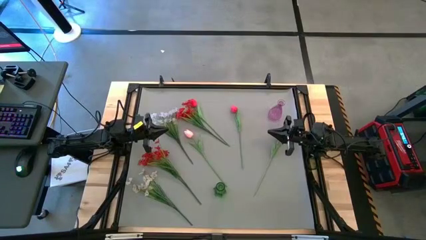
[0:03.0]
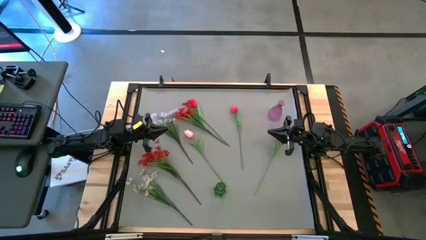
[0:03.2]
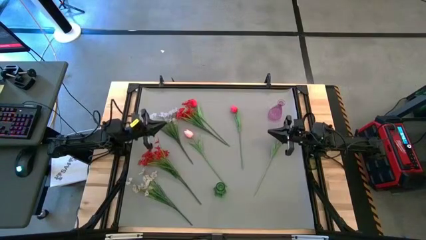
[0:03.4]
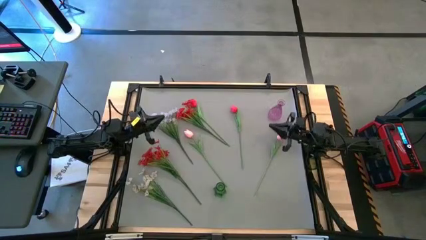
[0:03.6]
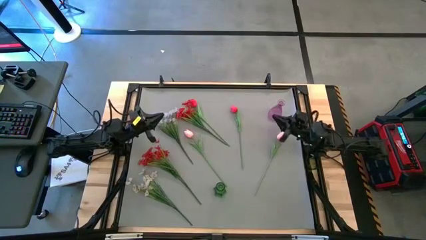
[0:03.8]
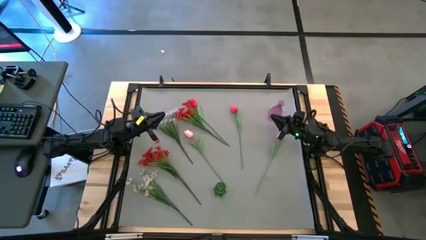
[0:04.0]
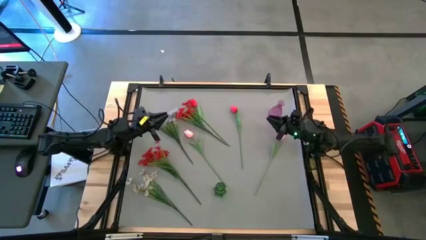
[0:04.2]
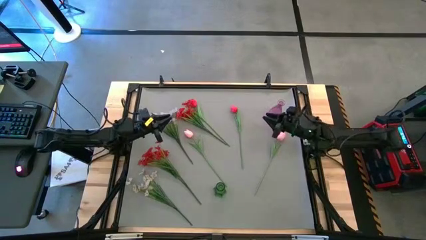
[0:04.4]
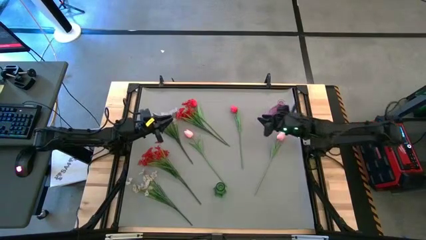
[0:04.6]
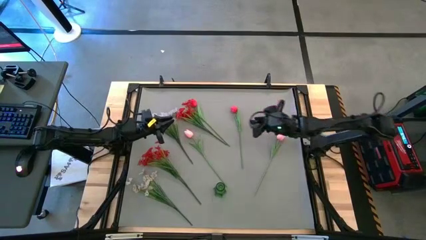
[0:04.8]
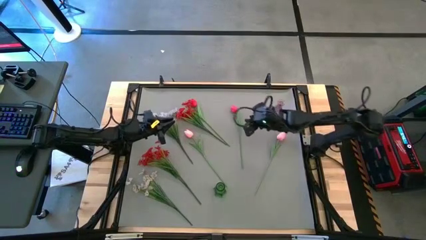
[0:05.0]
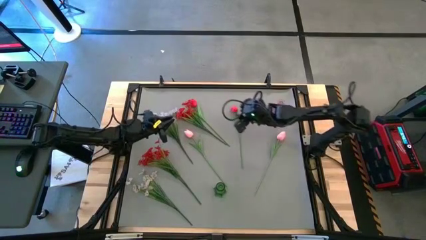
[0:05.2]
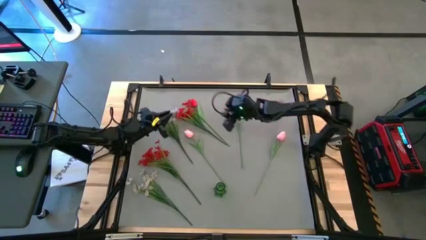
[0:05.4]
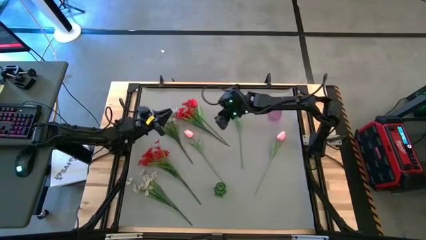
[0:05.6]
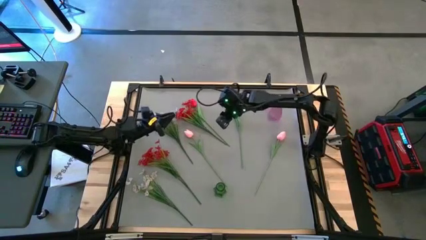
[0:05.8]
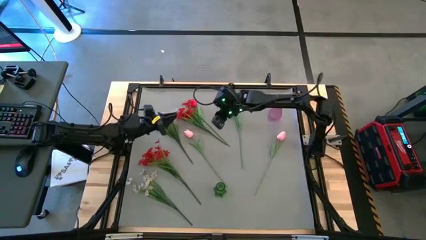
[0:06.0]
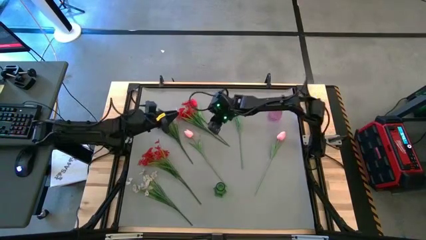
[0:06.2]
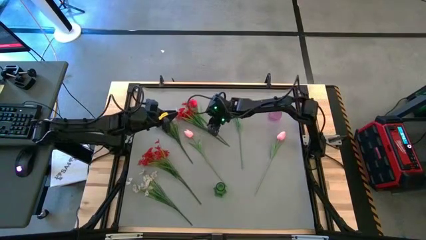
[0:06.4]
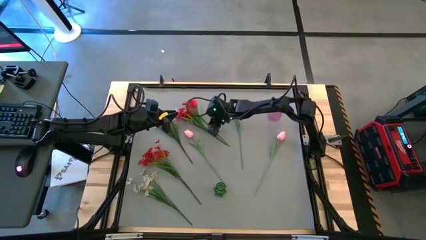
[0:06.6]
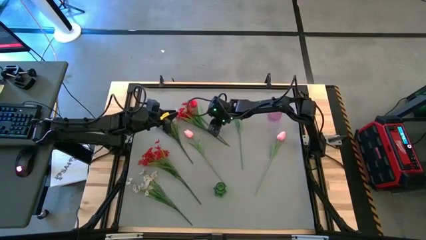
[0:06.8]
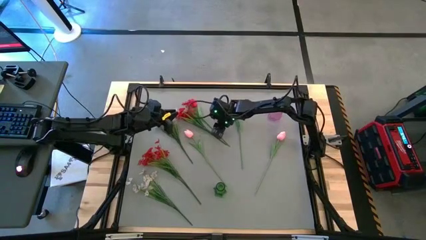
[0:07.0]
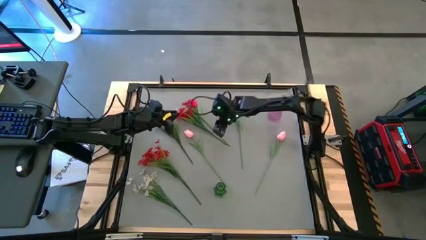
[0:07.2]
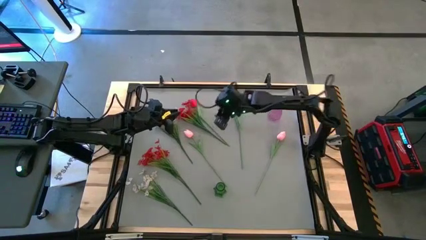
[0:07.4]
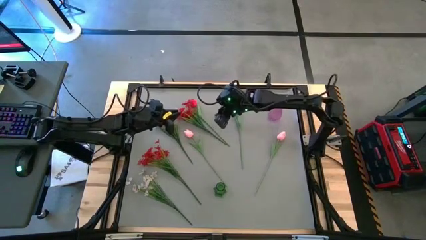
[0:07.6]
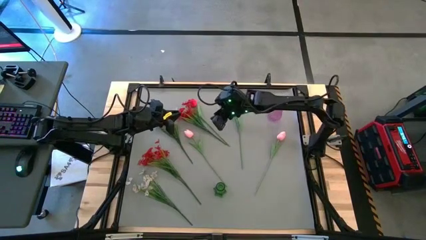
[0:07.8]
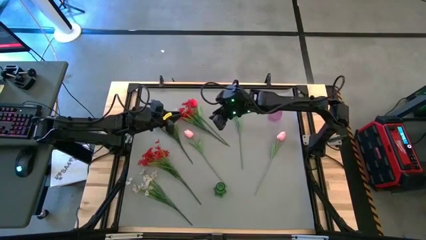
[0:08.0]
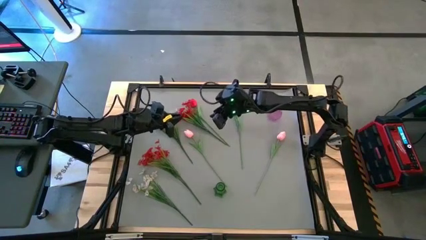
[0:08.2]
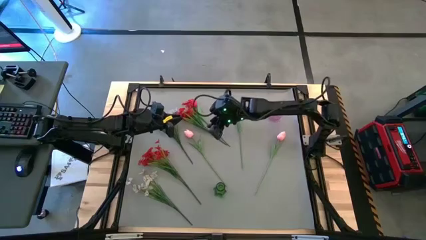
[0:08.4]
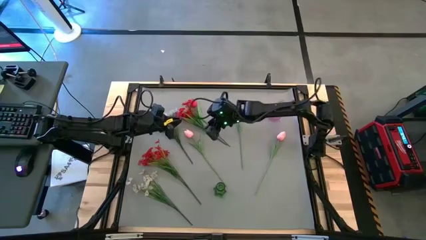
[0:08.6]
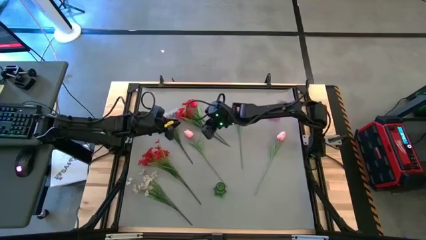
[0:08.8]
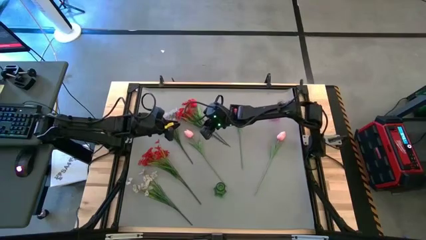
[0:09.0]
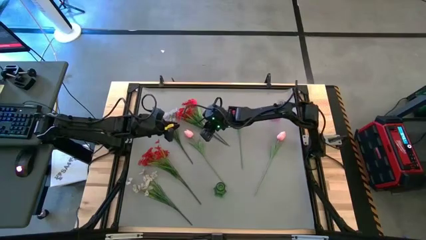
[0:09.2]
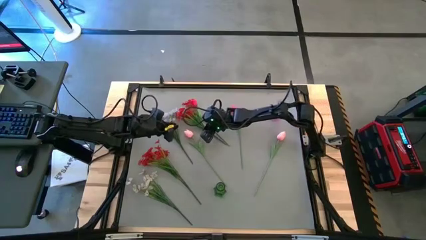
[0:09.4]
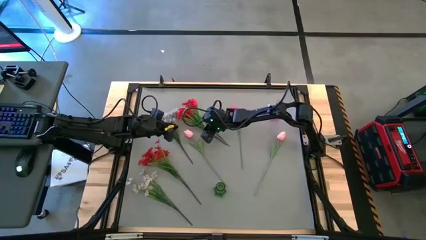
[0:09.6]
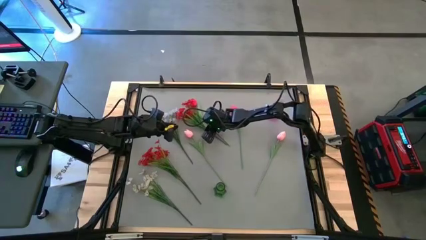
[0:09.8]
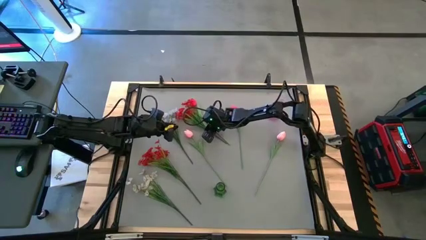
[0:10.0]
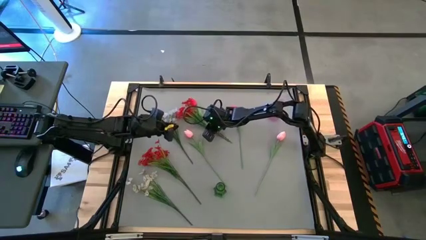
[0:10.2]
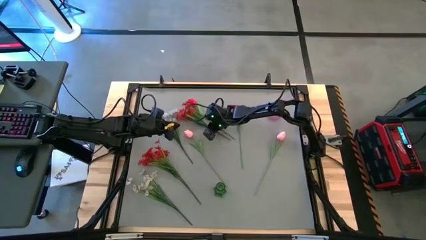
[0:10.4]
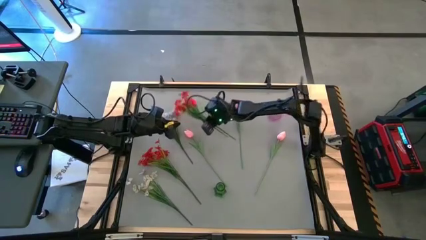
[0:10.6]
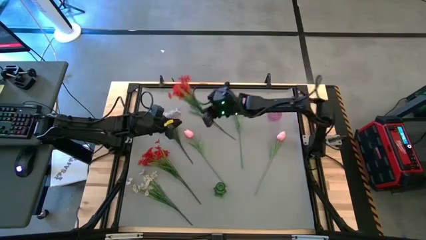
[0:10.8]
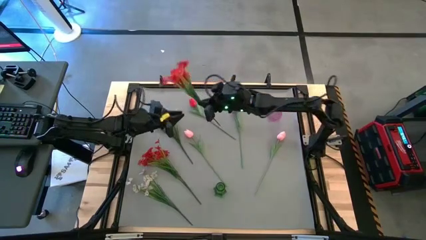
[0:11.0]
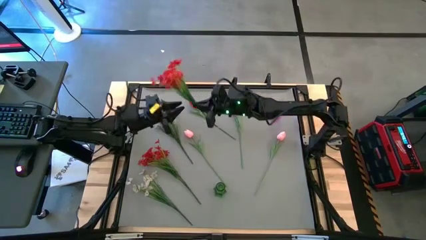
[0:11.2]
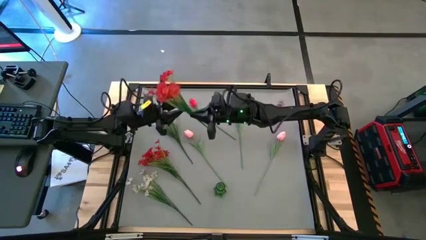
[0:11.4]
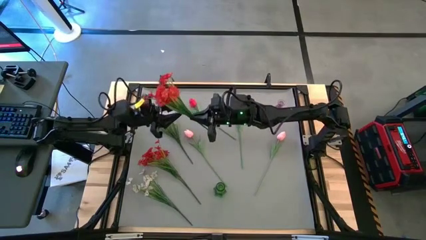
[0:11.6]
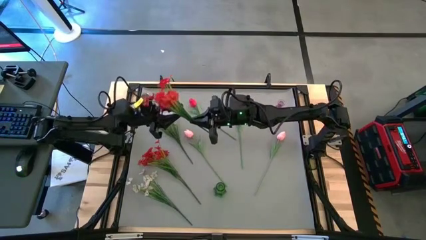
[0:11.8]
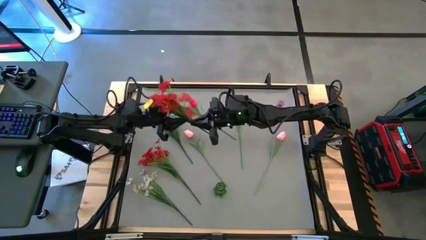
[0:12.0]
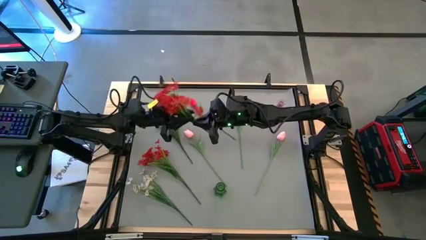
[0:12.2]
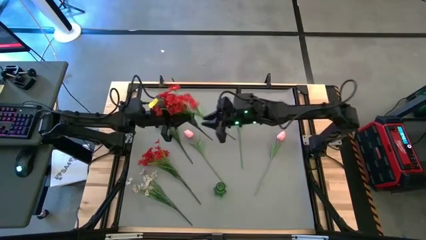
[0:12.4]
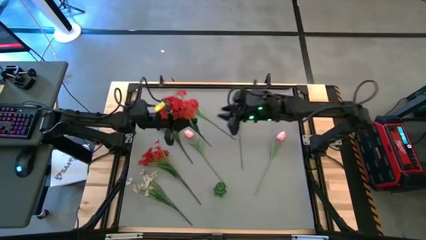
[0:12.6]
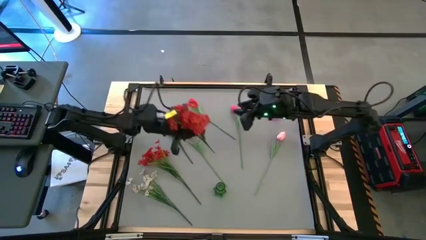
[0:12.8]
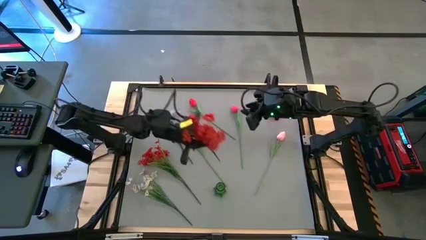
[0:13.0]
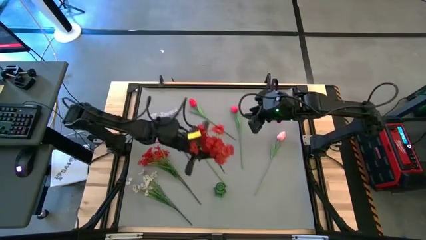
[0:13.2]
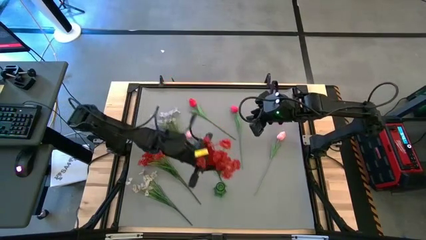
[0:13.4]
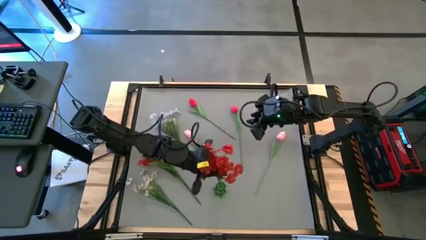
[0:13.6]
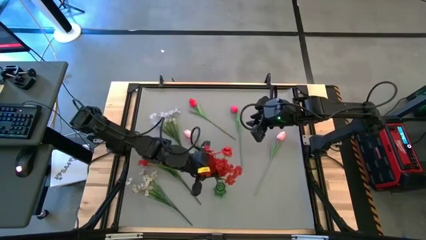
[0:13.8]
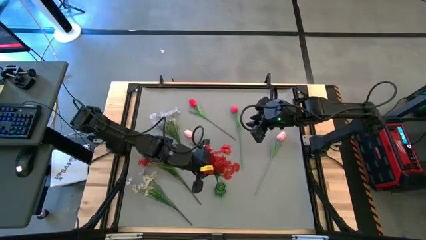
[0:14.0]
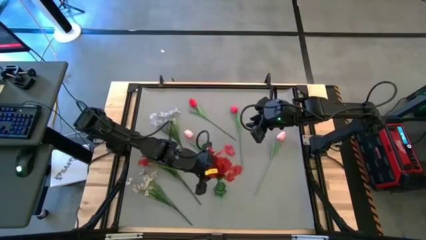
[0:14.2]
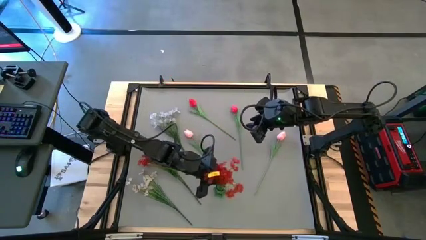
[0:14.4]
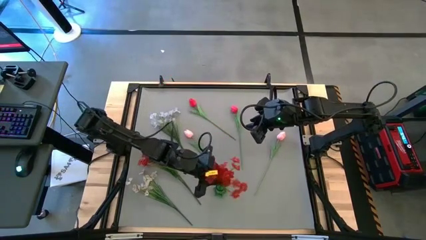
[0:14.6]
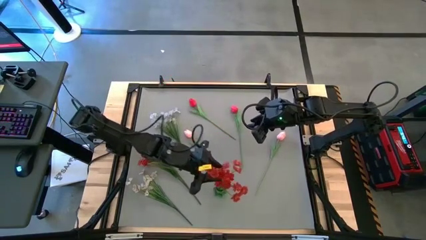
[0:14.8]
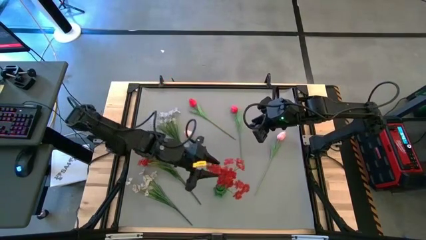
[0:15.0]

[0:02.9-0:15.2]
Task: Sort flowers into vase by color
Put the top red flowers into the green vase

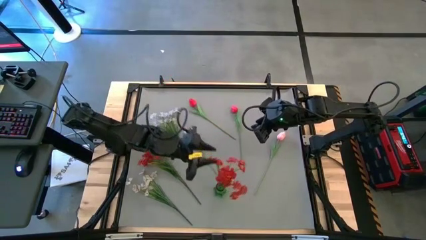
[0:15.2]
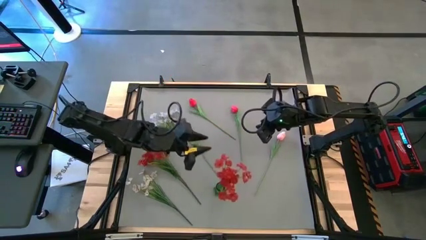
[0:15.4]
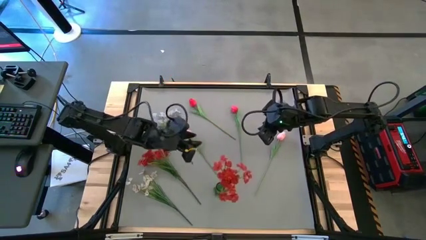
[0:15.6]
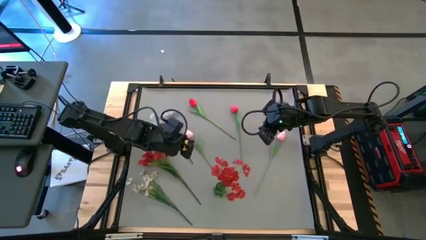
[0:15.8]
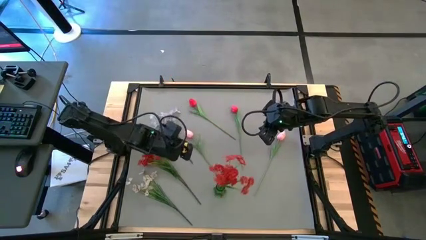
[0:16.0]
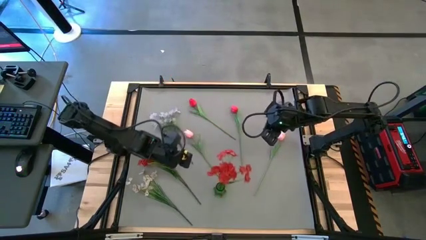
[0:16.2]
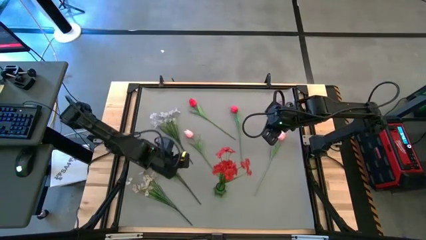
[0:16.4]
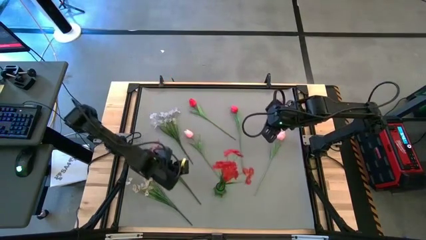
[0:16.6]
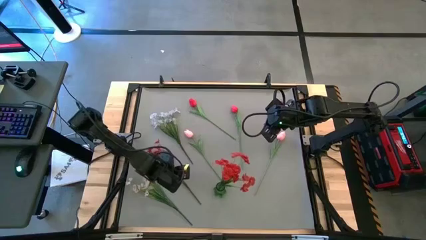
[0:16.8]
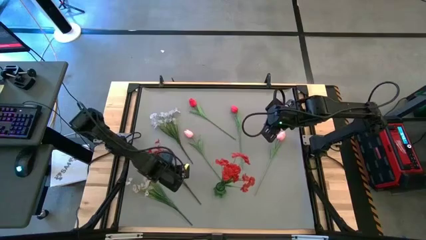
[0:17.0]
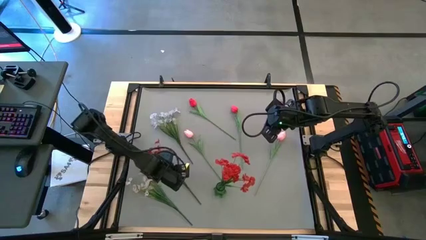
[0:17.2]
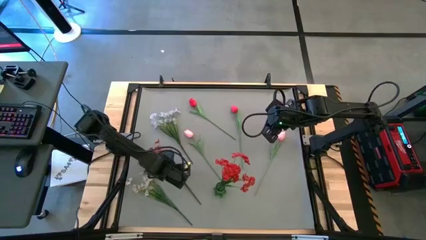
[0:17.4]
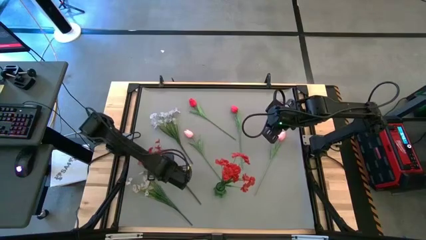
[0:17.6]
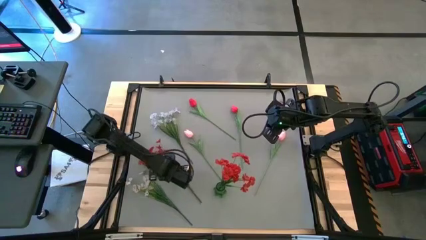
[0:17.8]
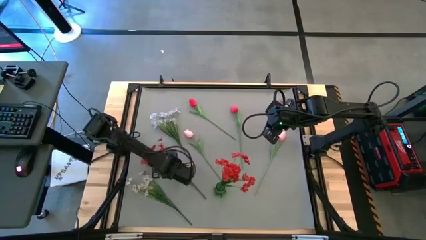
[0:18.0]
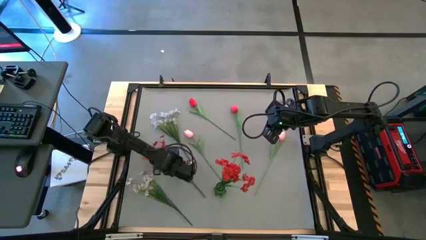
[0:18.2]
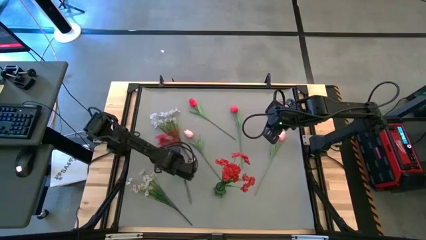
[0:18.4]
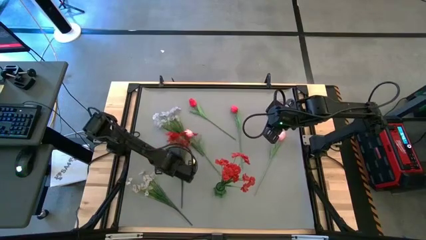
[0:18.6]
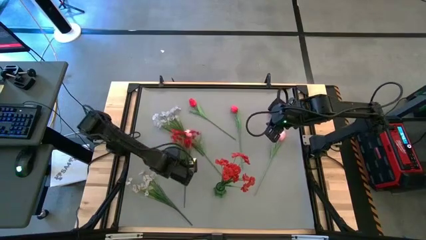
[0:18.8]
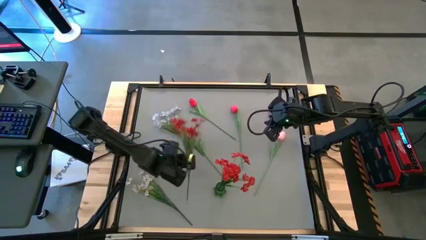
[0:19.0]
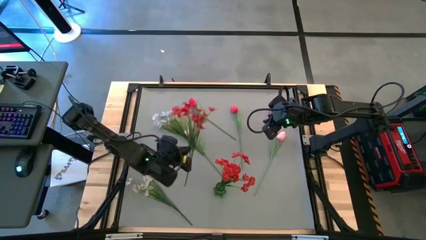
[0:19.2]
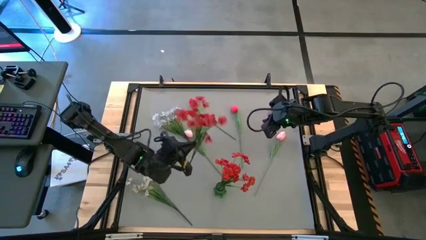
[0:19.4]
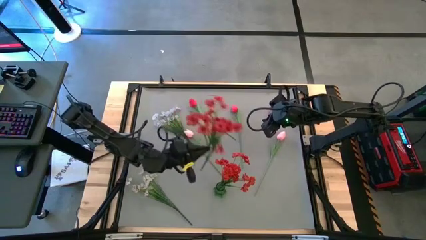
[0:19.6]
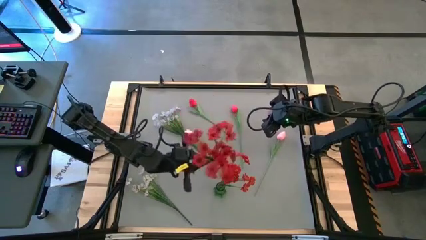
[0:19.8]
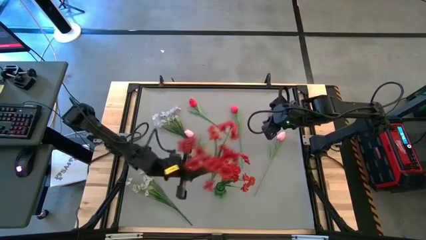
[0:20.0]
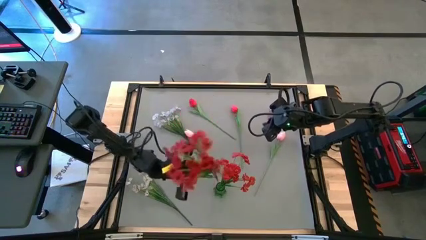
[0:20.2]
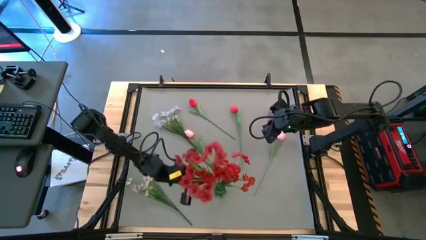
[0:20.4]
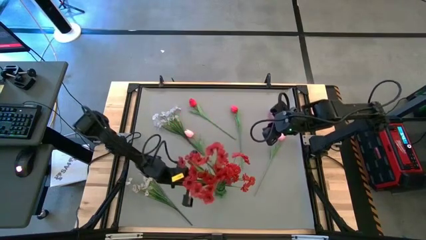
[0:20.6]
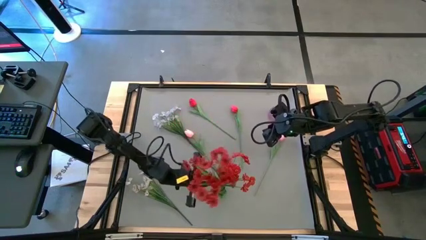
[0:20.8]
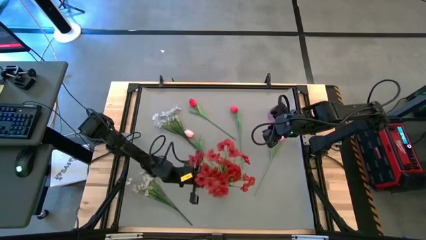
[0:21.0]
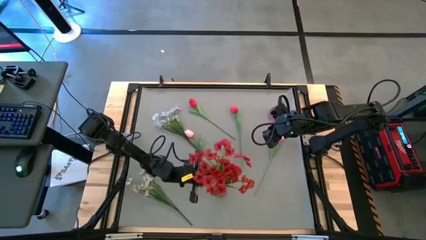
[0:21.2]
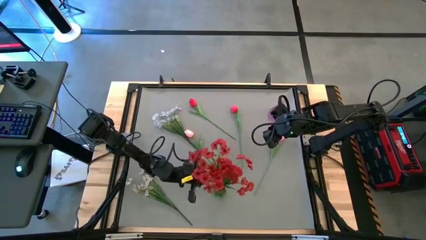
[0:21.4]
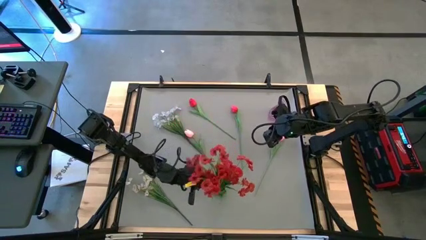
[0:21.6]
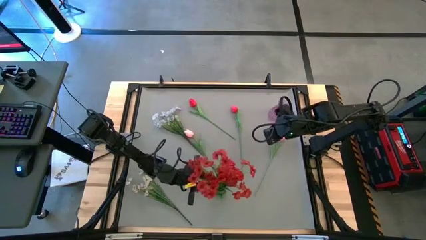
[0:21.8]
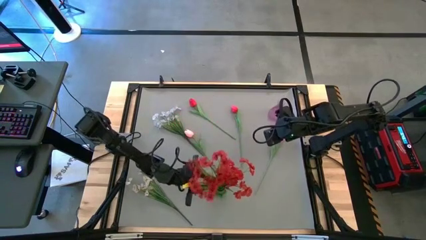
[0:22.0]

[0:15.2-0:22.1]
Put the red flowers into the green vase
